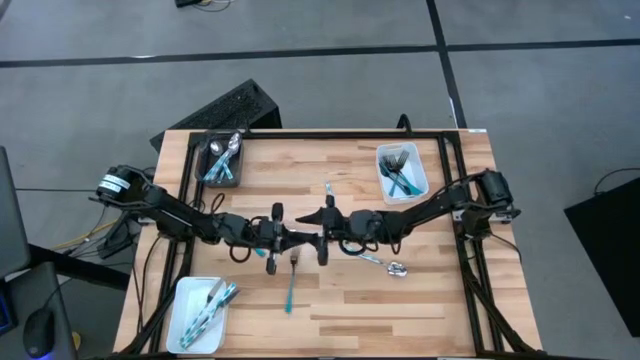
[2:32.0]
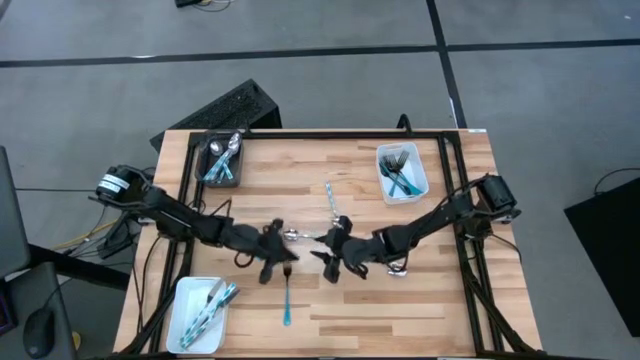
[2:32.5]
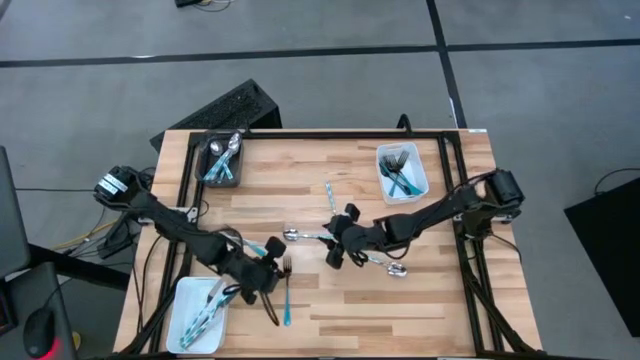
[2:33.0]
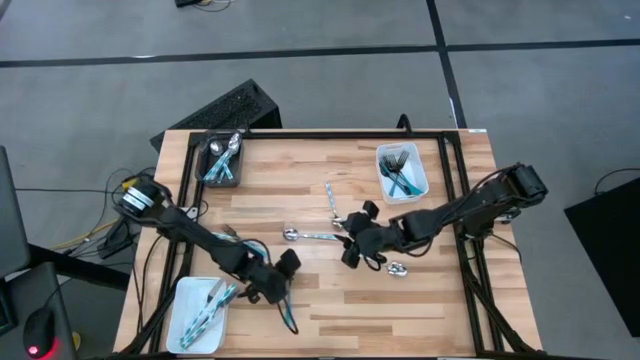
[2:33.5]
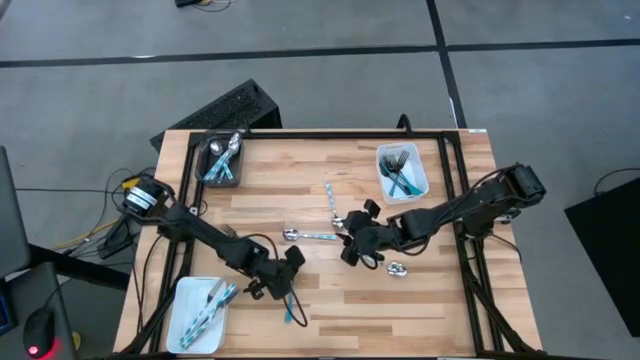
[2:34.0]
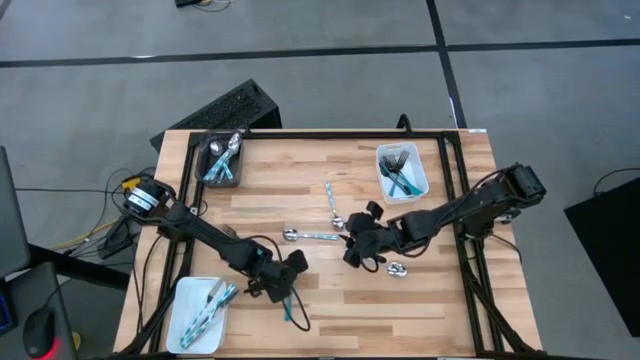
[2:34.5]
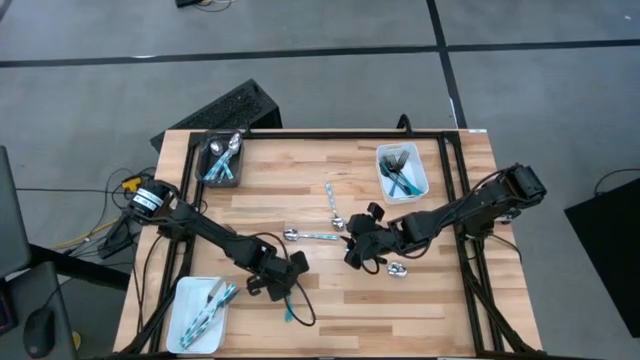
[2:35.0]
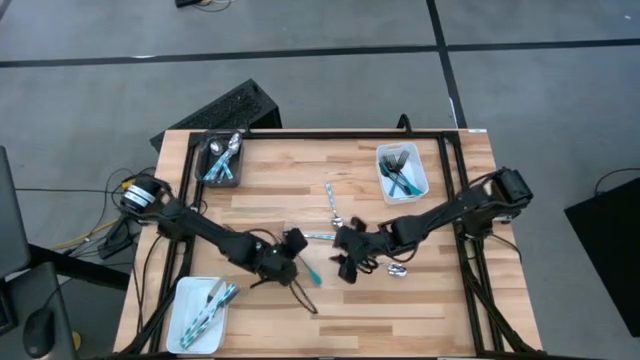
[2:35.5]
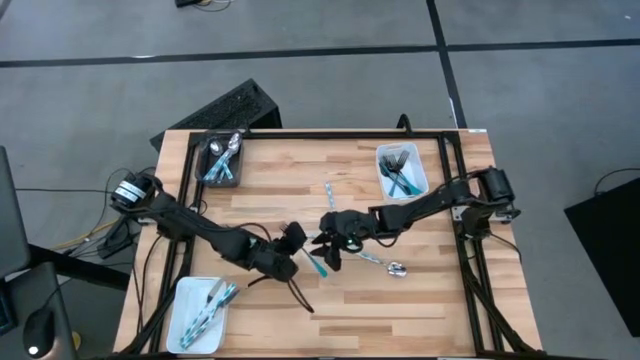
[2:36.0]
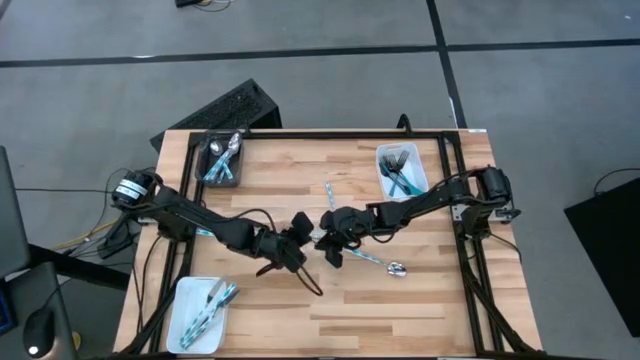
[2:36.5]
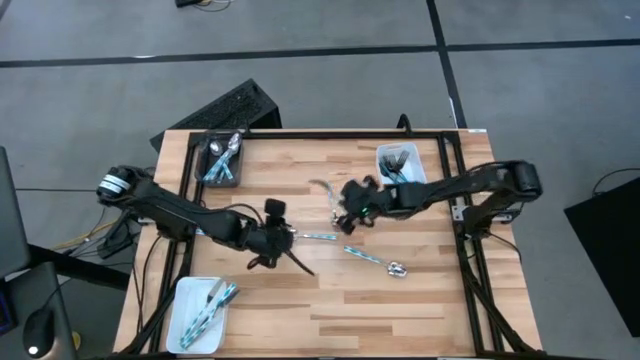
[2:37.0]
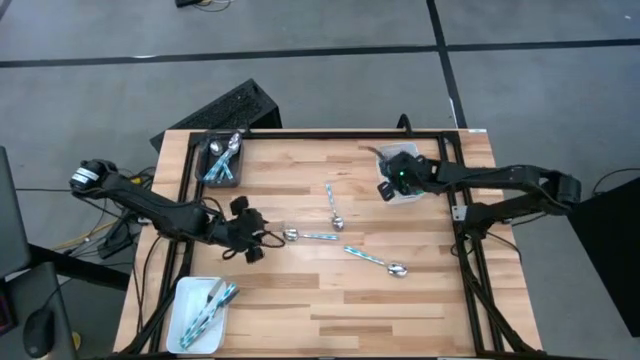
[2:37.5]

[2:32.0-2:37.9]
Task: Sort silverware by color (type)
Put the blue fork into the top white bin

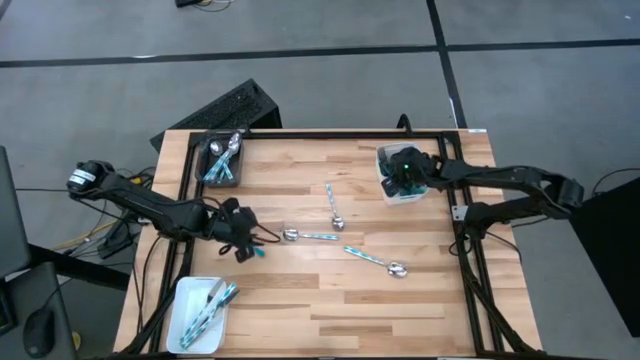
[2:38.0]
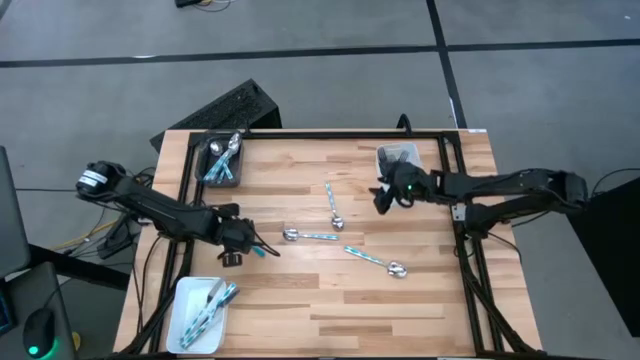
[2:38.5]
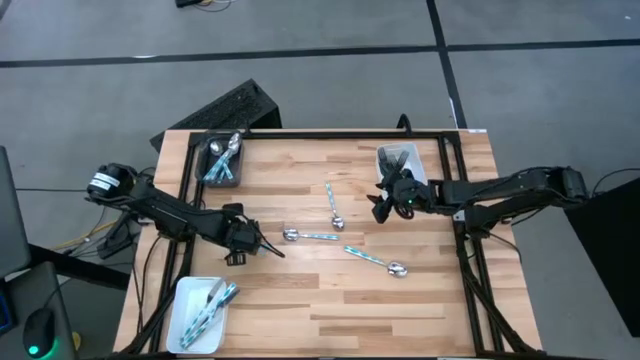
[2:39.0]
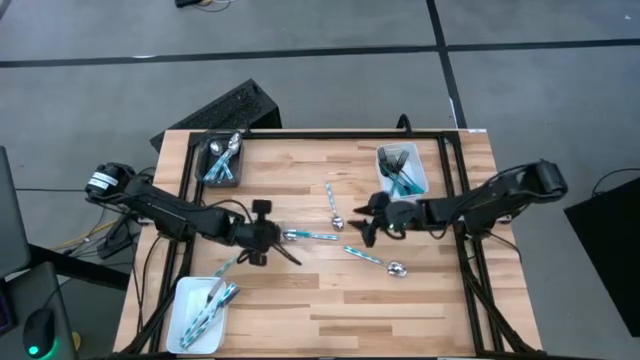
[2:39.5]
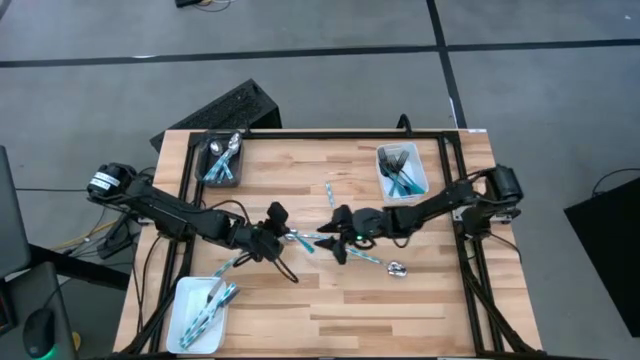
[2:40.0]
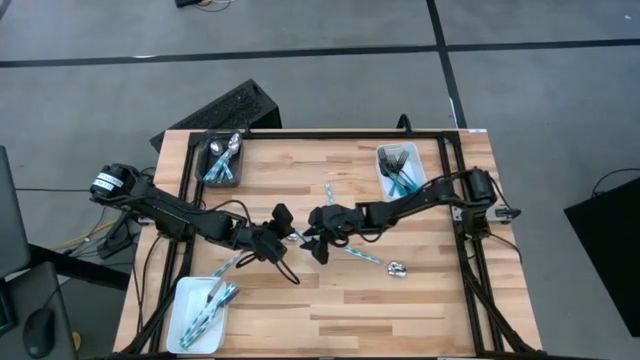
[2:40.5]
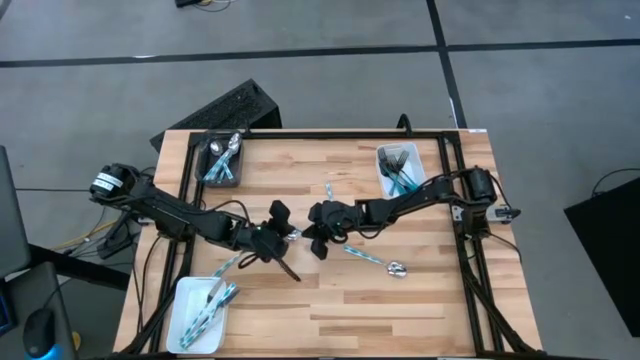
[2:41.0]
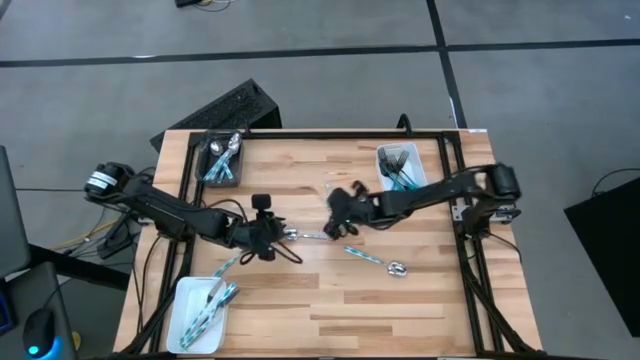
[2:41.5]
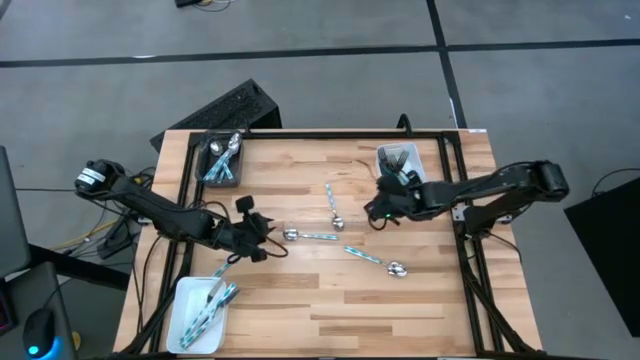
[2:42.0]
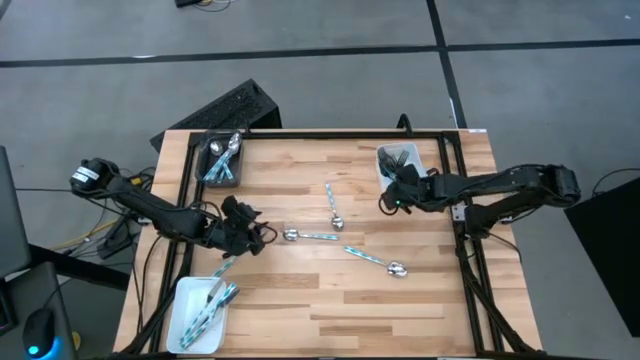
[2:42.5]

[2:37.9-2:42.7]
Put the blue fork into the top white bin

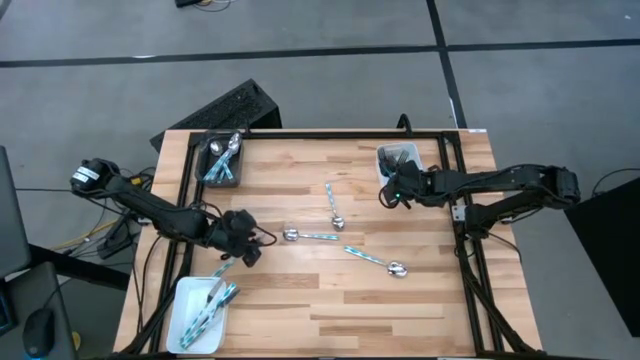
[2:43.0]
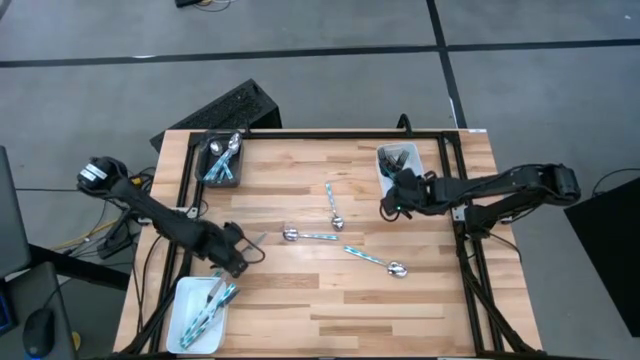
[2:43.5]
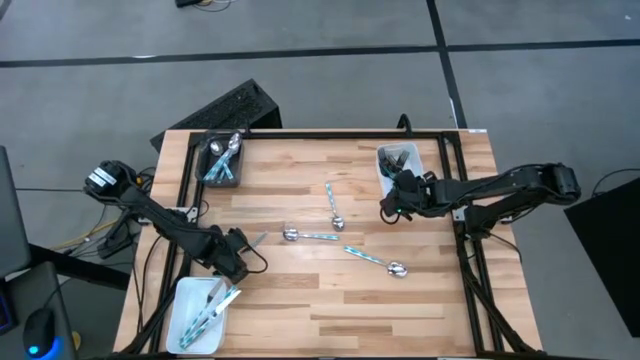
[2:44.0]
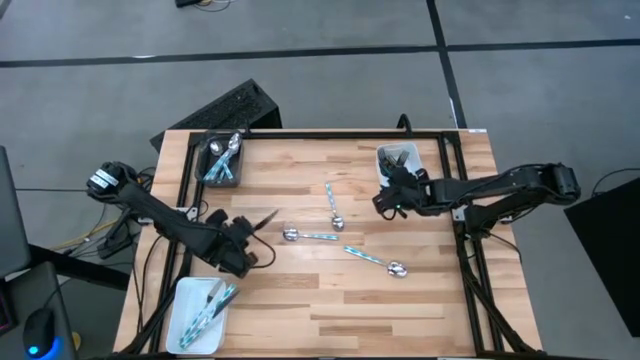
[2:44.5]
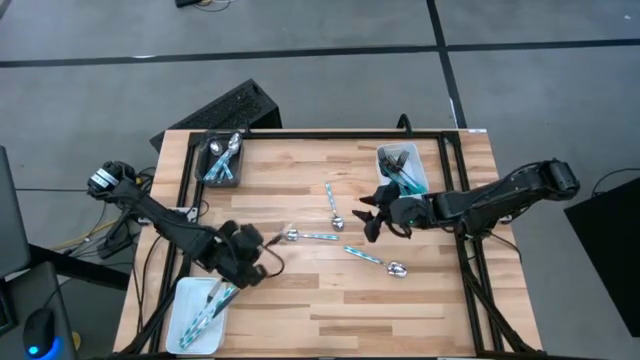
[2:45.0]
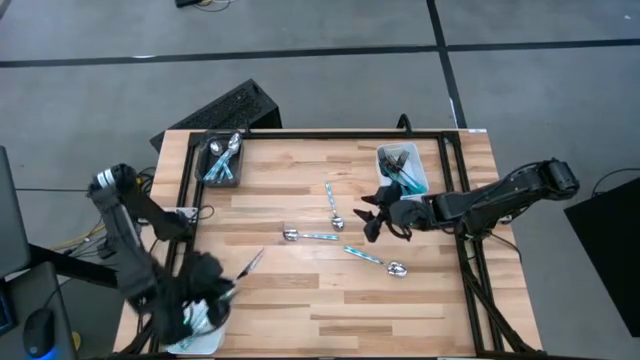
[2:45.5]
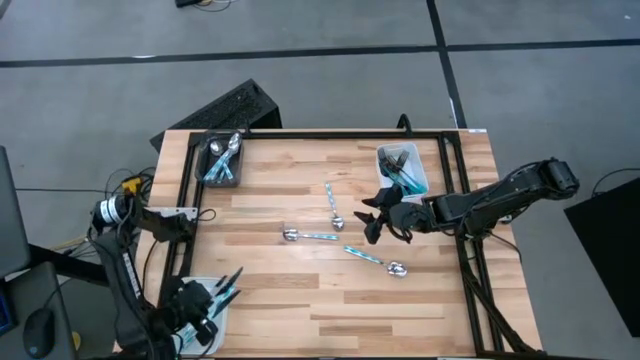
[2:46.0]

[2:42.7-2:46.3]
Put the light blue table knife into the bottom white bin

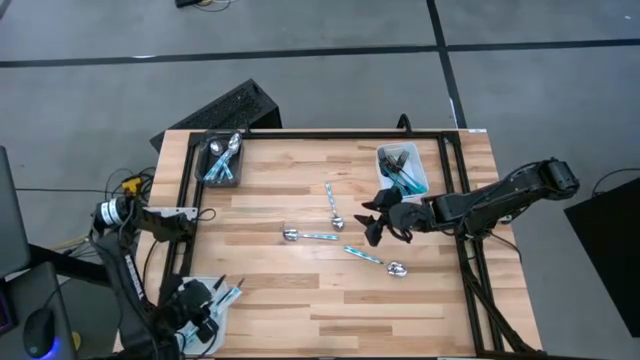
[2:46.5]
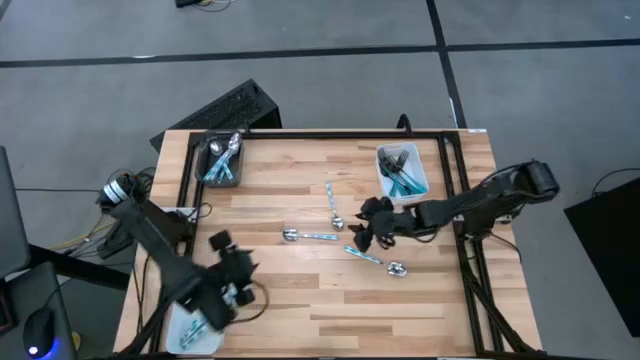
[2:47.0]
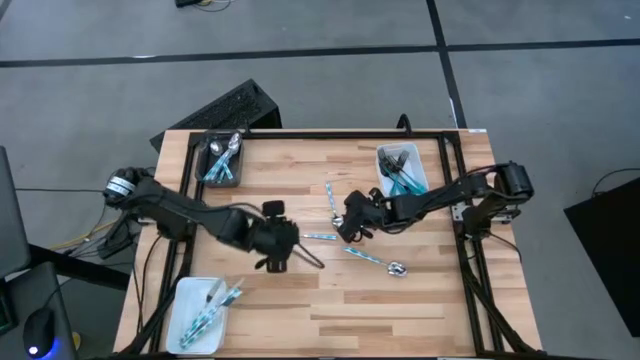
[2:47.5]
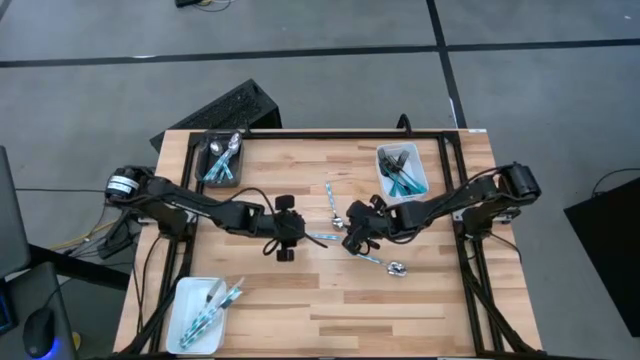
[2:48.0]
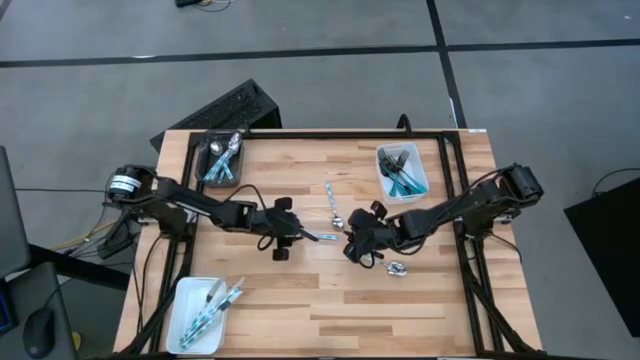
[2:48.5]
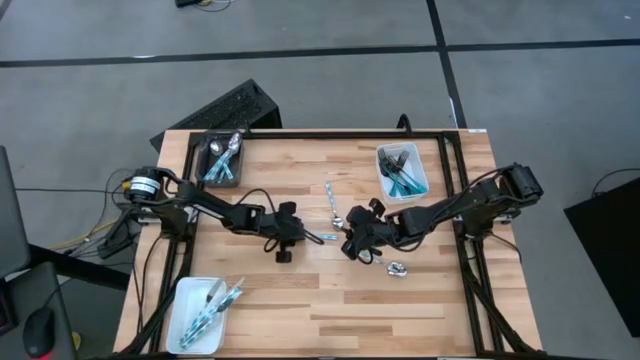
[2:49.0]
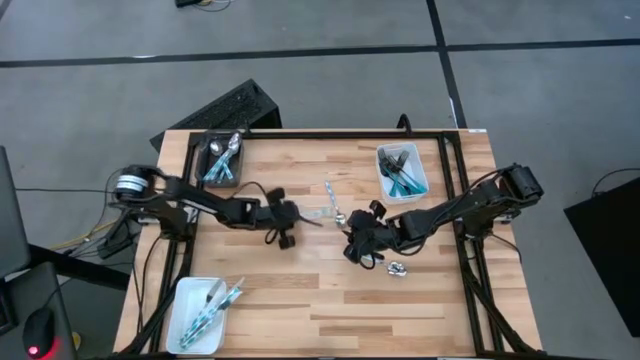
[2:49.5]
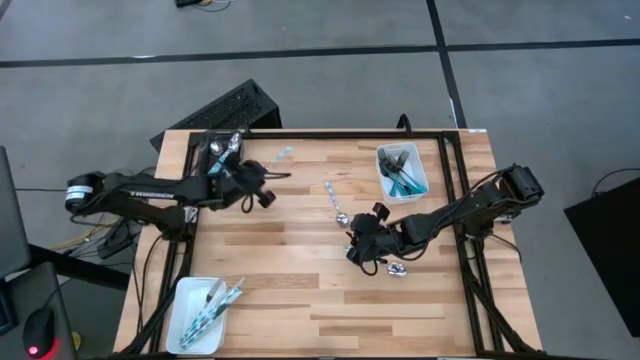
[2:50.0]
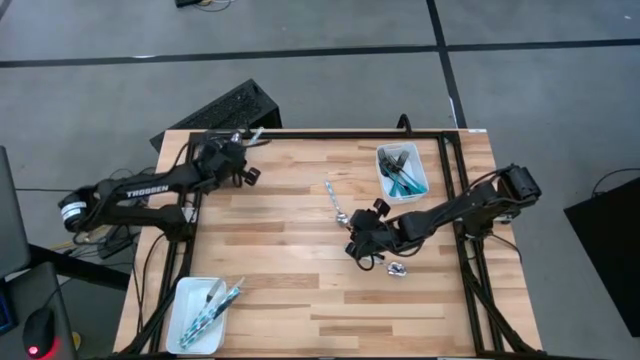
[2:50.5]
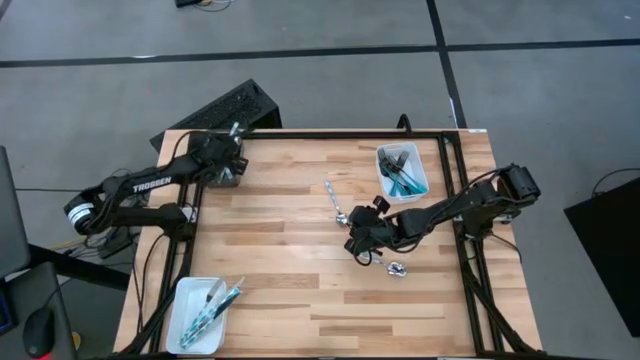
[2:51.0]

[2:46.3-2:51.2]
Put the light blue spoon into the black bin

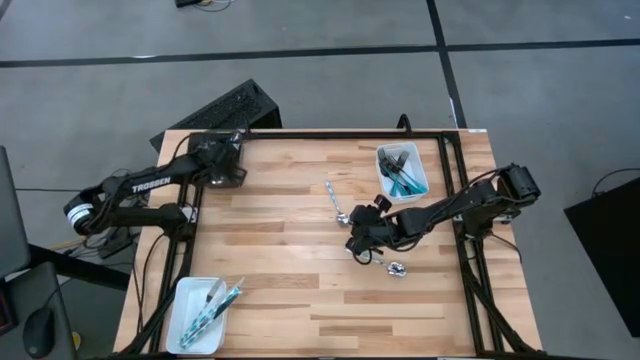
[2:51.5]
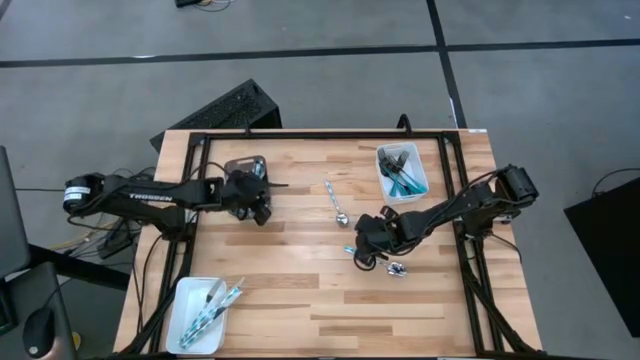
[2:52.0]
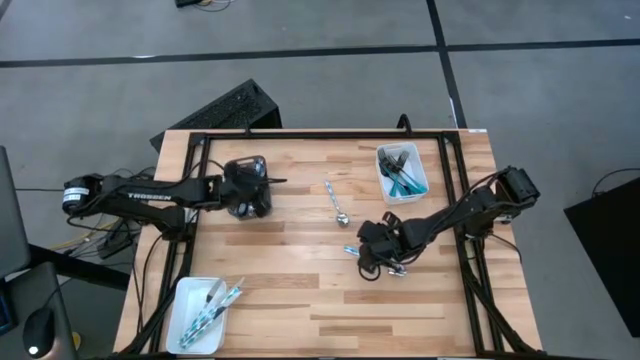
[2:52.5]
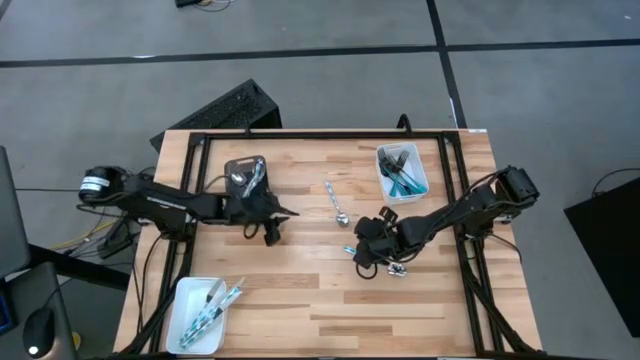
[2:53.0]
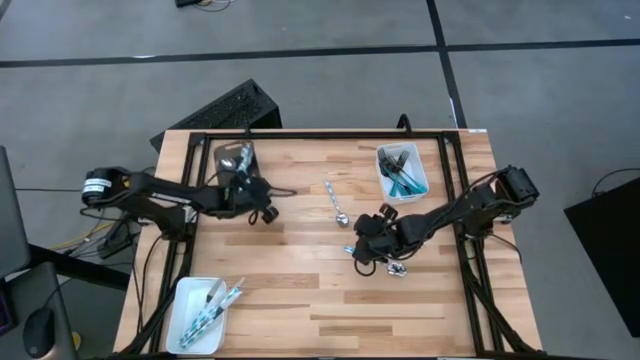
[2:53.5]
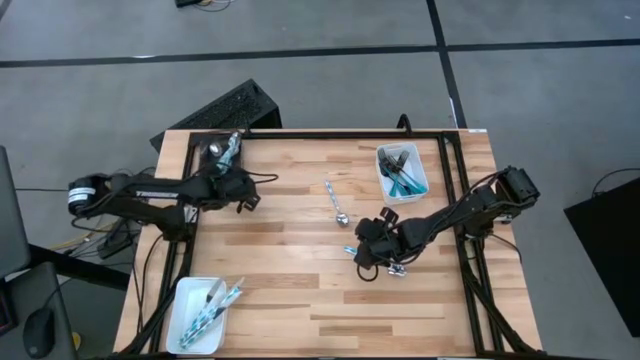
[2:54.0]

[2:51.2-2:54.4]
Adjust the black bin
